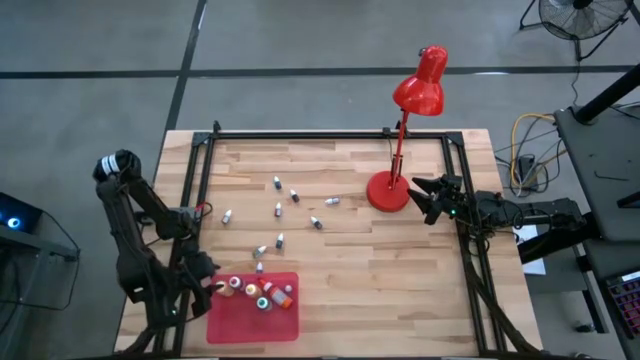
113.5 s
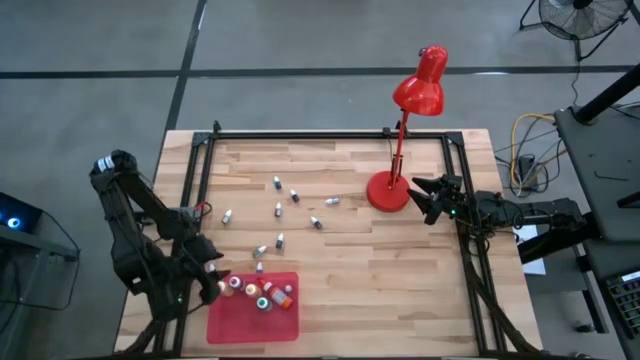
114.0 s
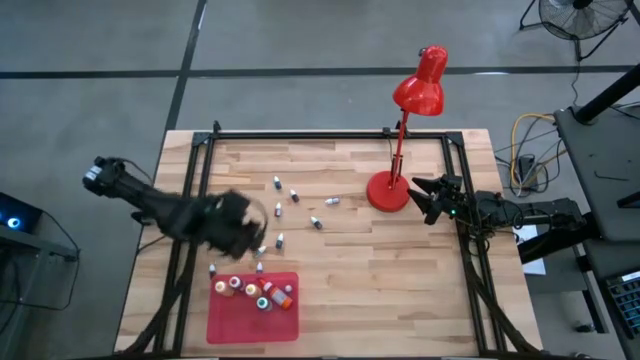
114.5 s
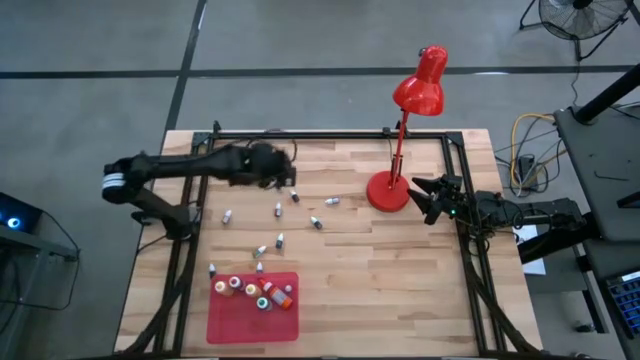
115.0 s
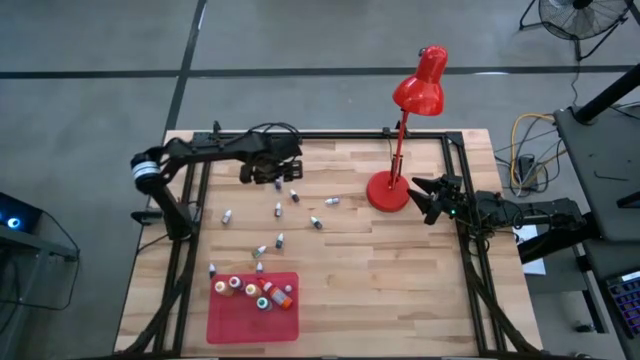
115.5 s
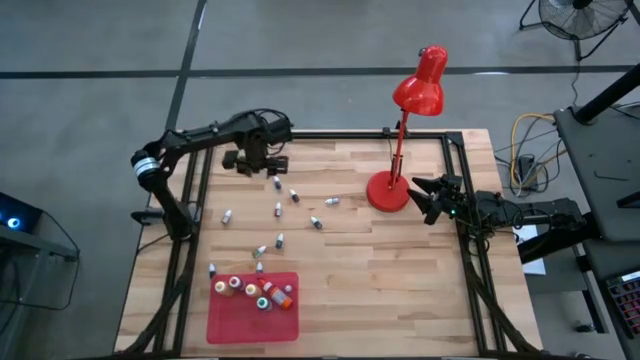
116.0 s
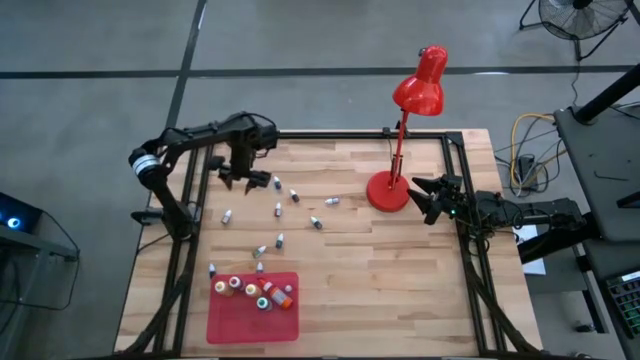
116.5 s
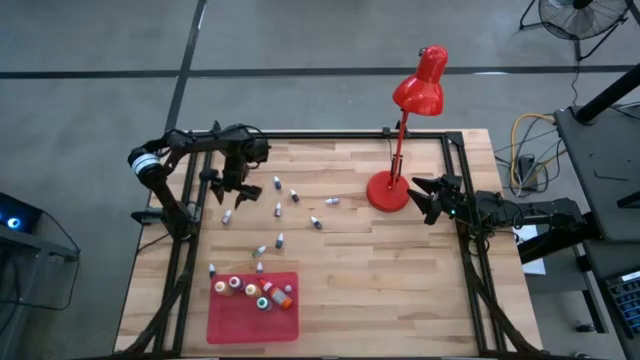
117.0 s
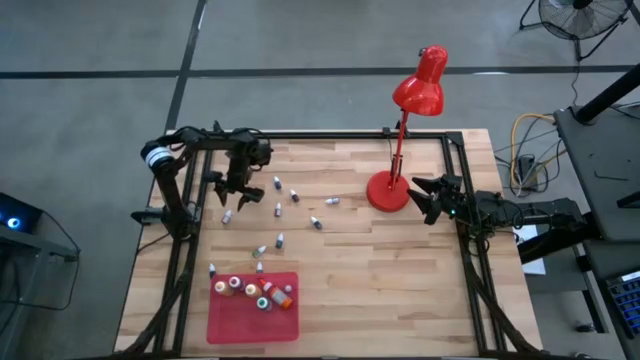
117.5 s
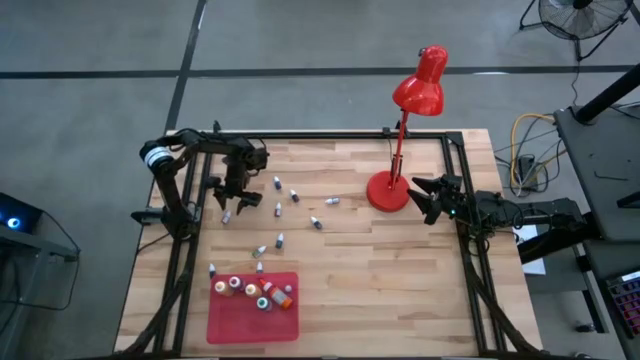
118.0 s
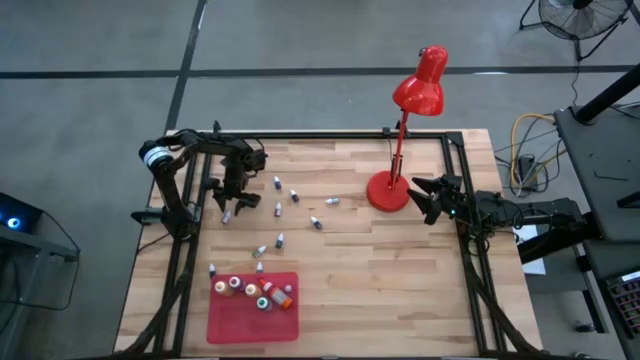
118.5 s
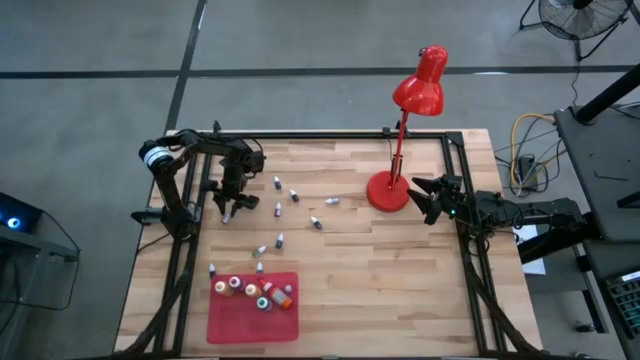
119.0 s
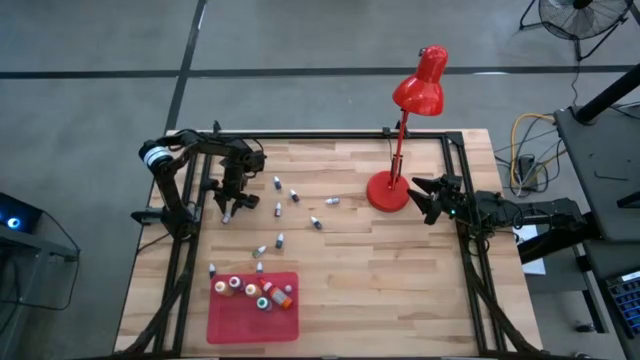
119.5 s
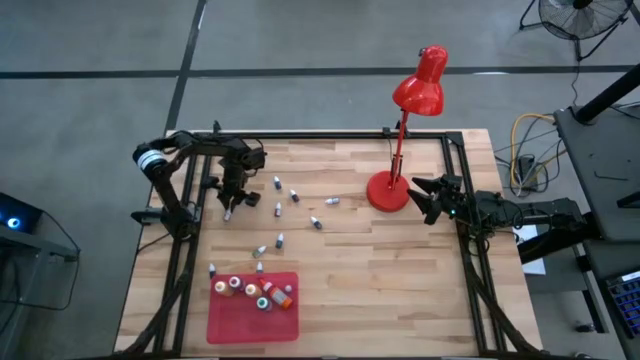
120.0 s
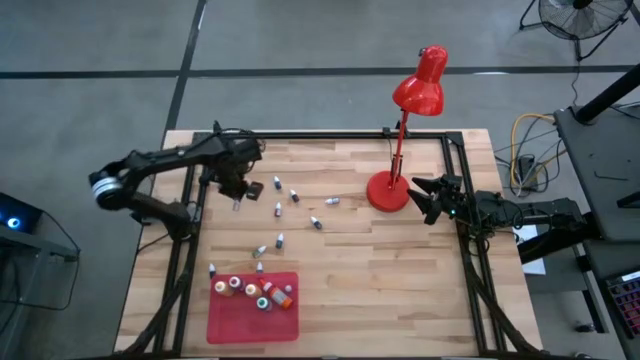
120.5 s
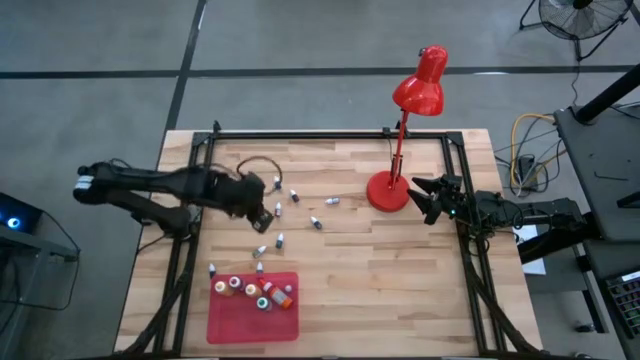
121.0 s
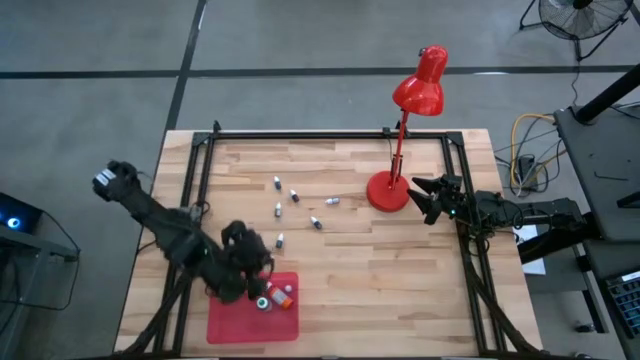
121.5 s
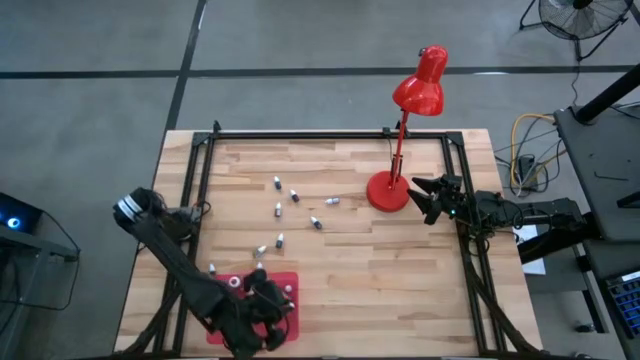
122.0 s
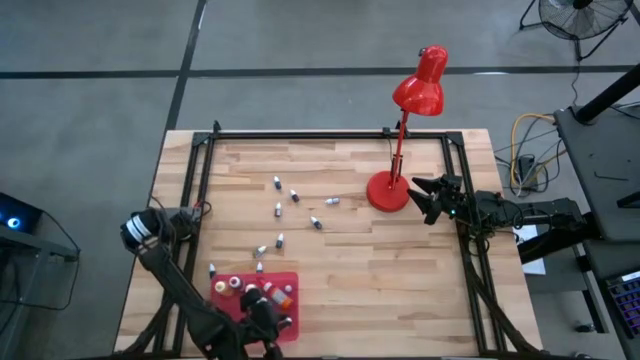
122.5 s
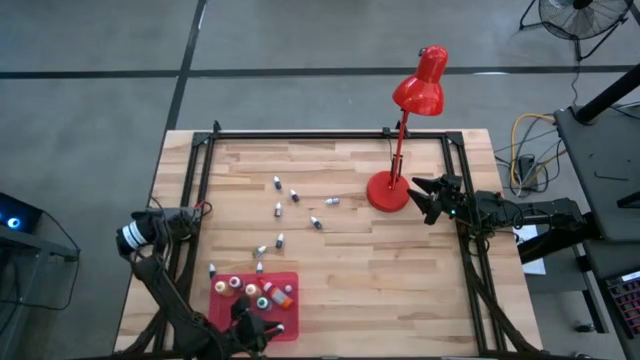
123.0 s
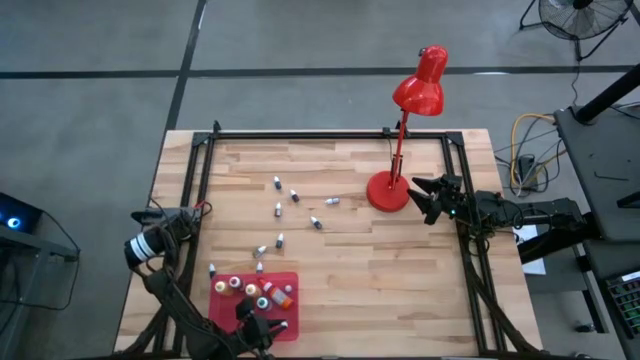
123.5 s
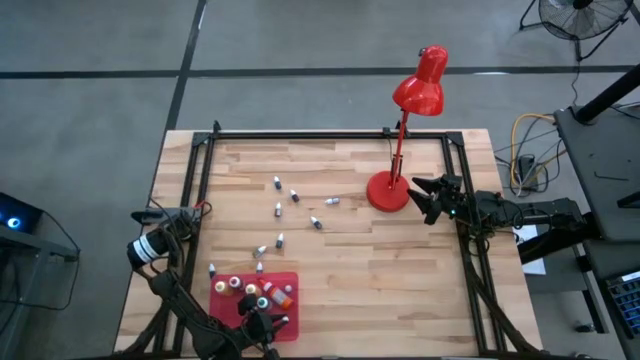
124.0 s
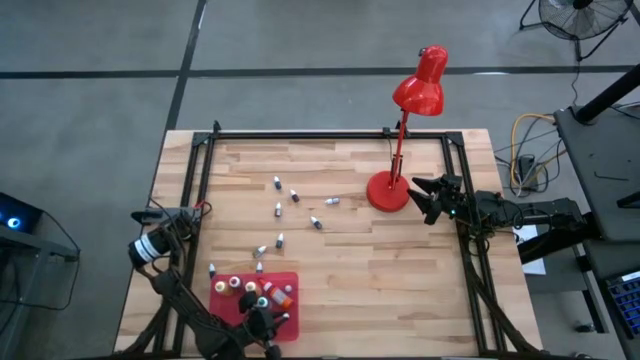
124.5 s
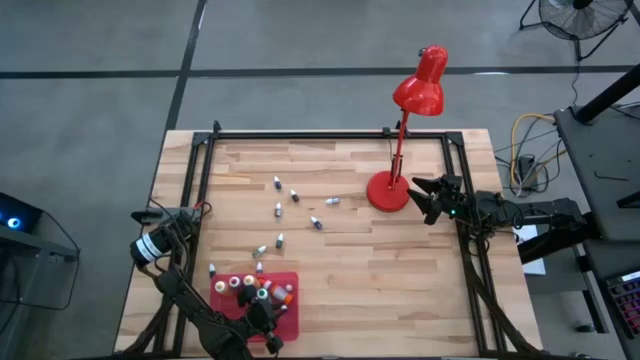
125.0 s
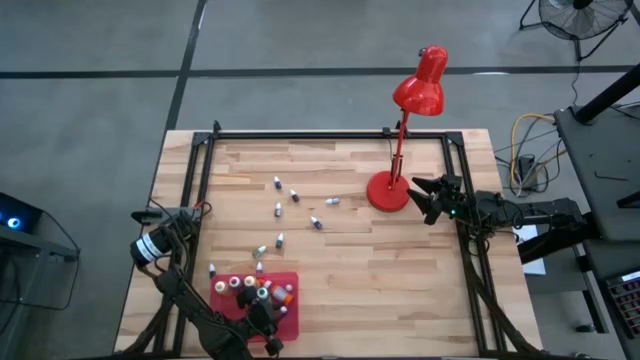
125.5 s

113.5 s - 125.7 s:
Task: Pick & Place food coloring
Put the small orange food coloring bottle into the red bin

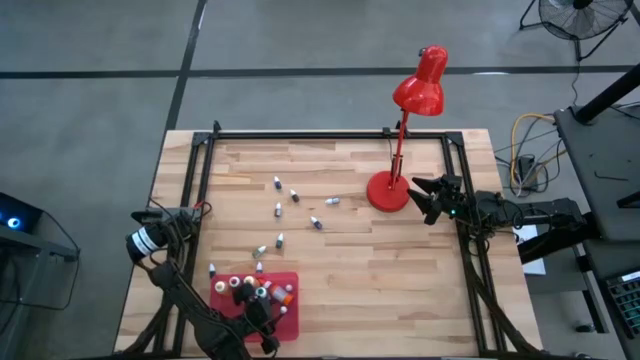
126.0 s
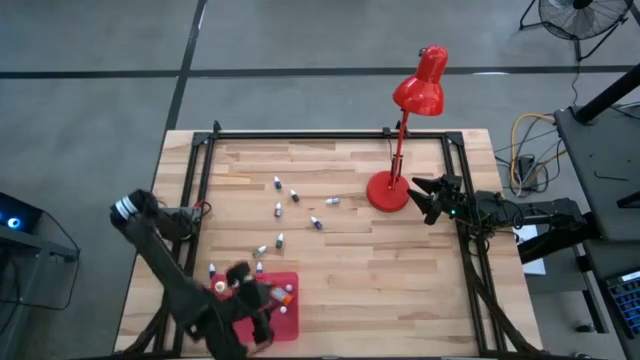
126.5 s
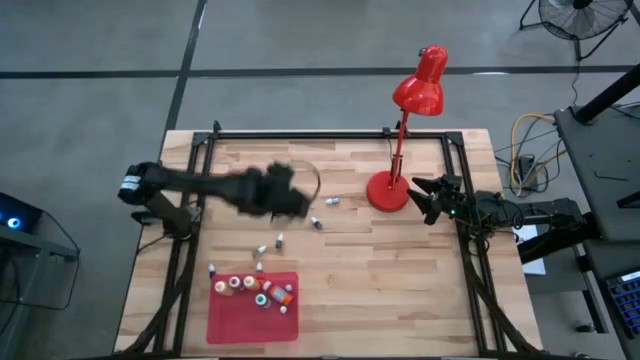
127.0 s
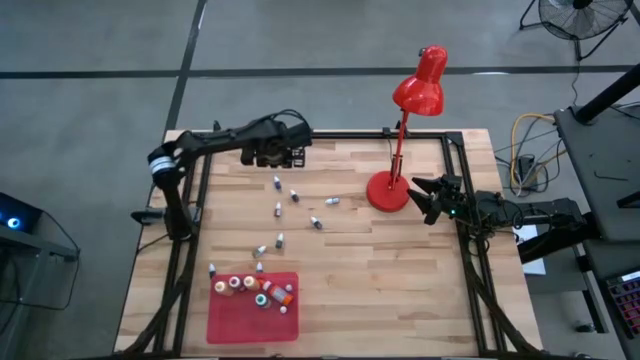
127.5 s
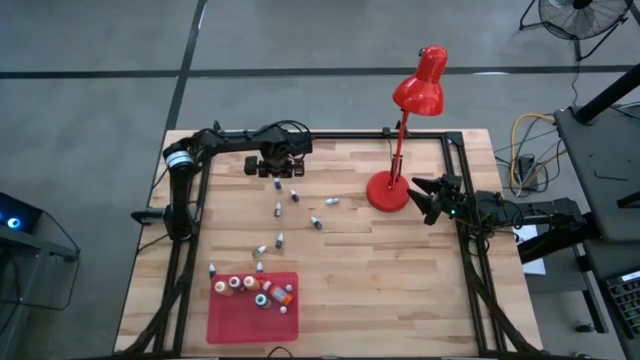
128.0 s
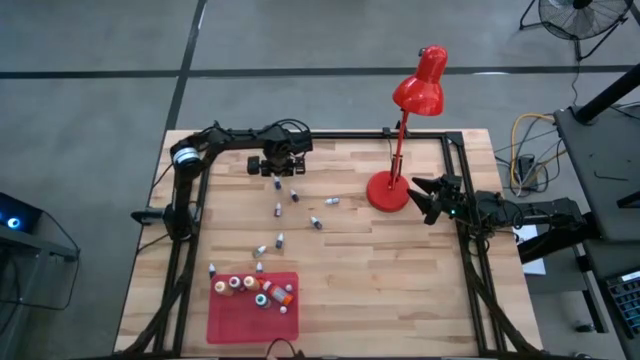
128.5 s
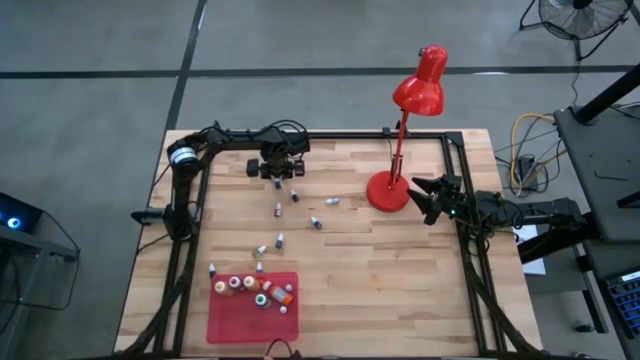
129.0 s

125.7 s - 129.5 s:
Put the small blue food coloring bottle into the red bin

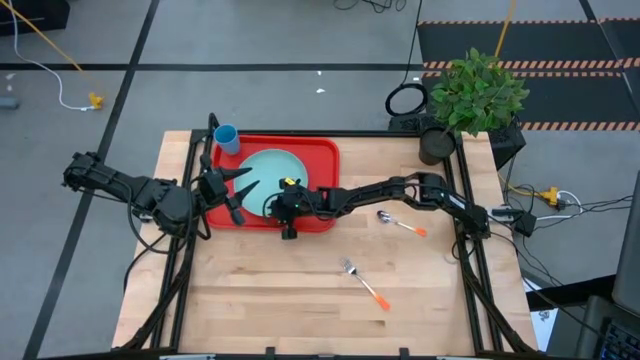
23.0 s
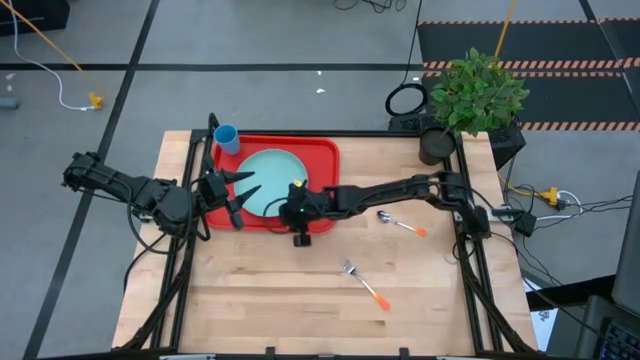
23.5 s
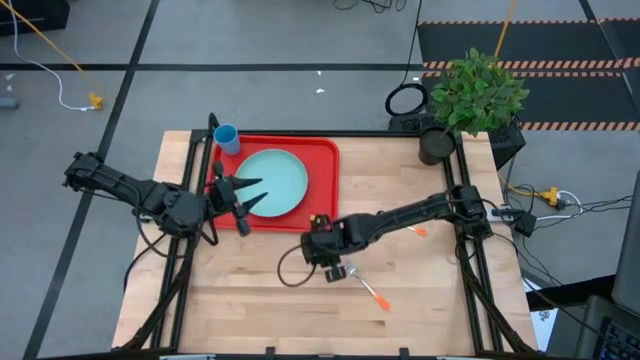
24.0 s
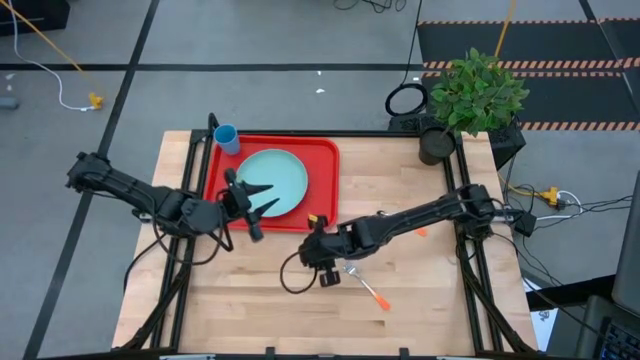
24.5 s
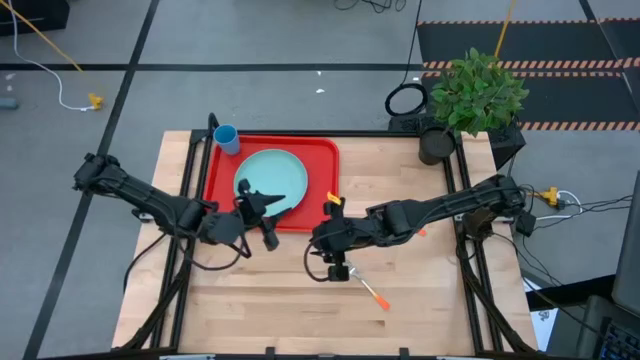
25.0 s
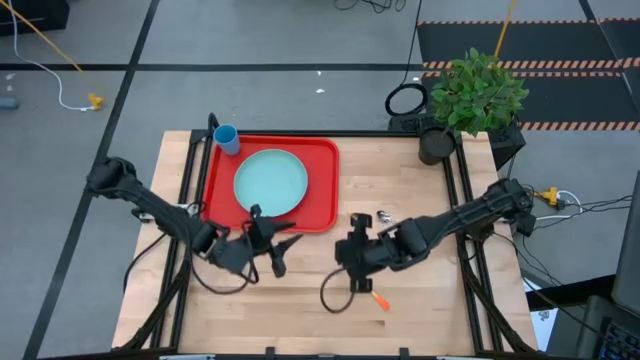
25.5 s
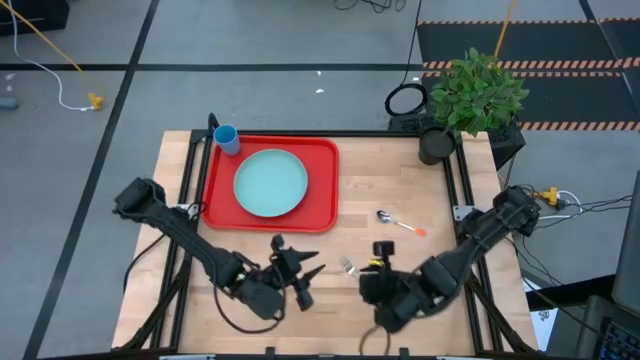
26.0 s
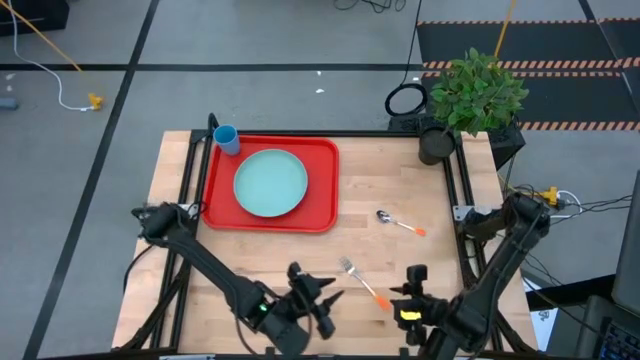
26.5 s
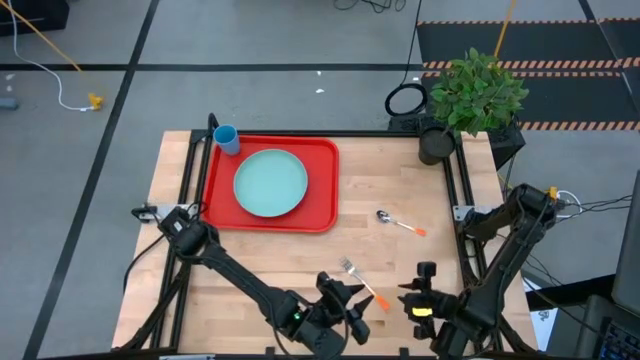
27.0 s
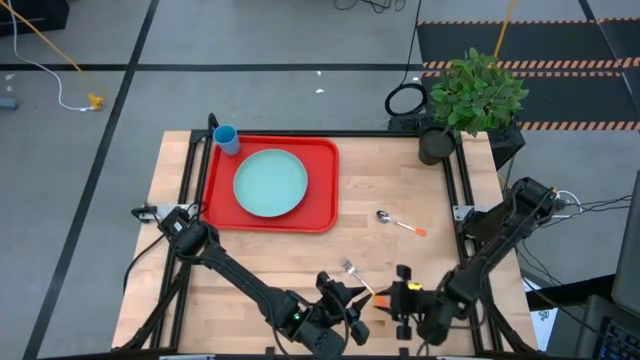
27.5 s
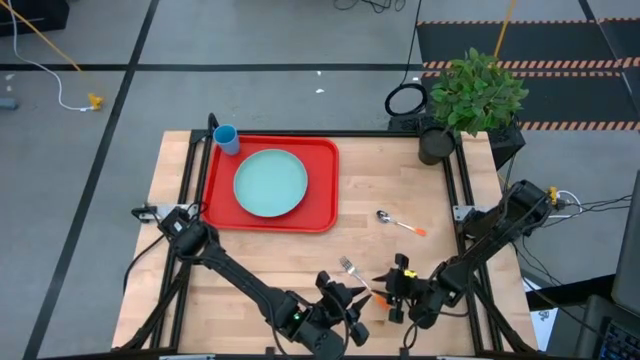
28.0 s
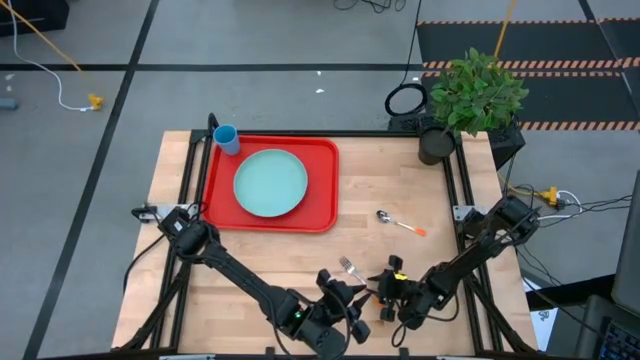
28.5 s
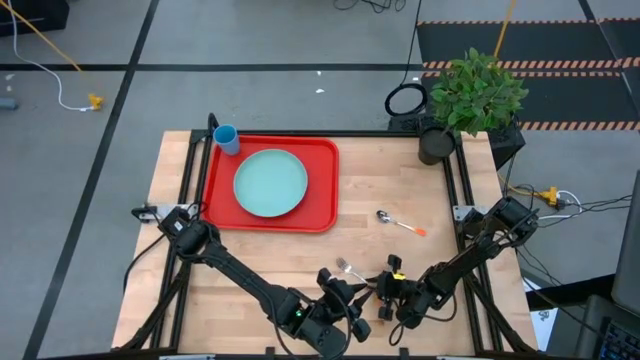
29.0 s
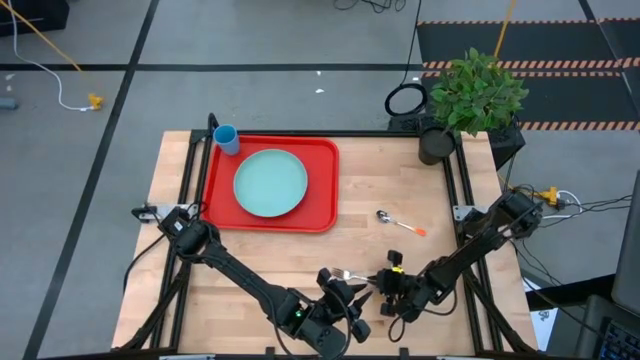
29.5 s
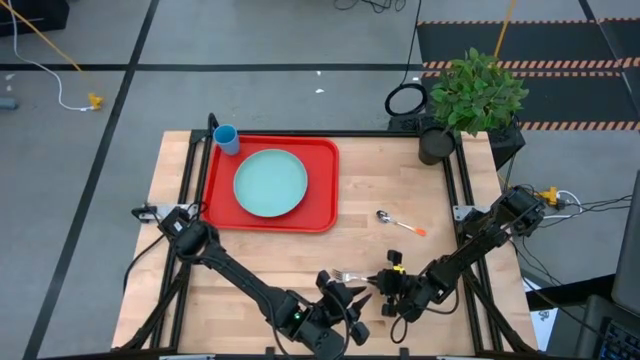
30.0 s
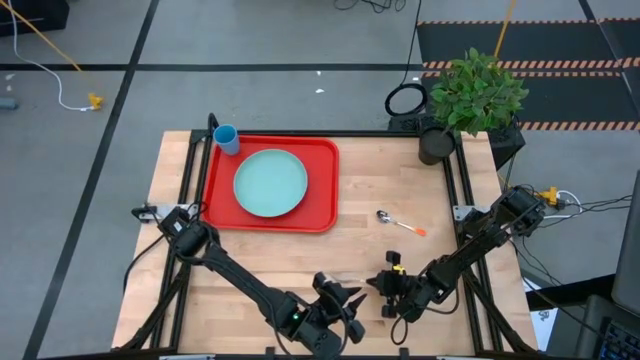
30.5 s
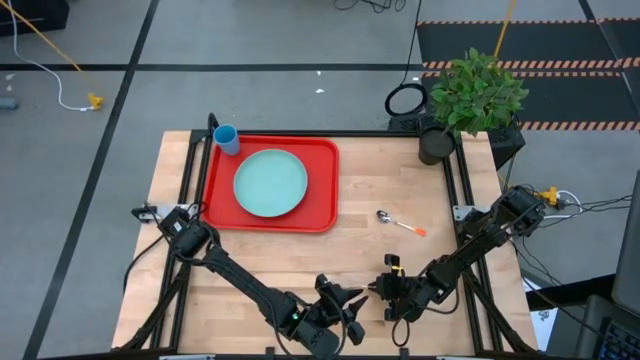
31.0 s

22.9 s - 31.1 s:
Task: Pick and place plate/cup/fork/spoon on tray
Put the orange fork on the red serving tray to the right of the blue plate
